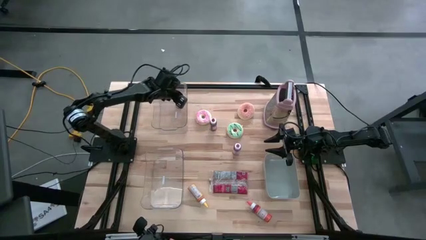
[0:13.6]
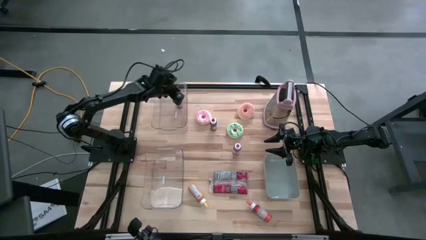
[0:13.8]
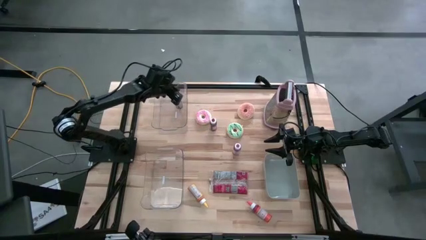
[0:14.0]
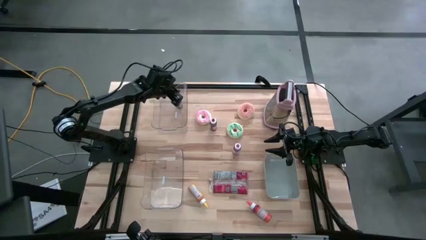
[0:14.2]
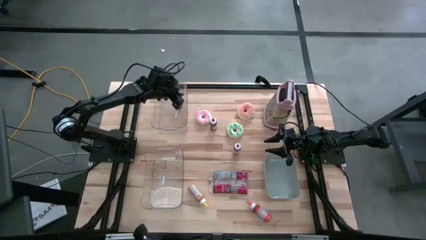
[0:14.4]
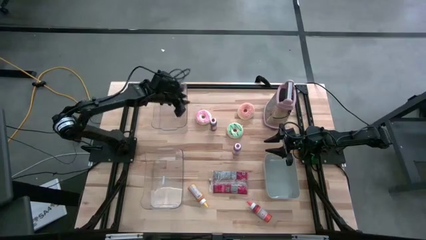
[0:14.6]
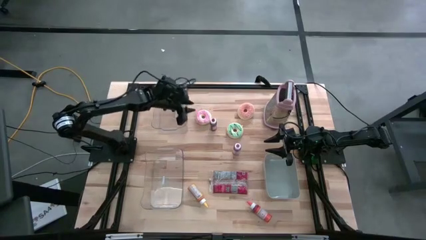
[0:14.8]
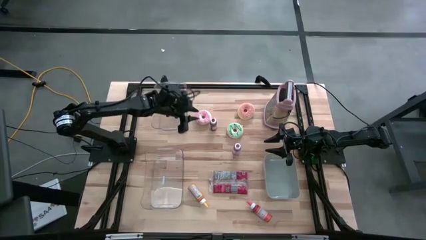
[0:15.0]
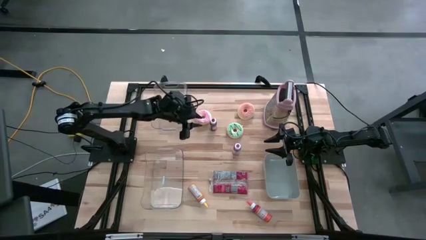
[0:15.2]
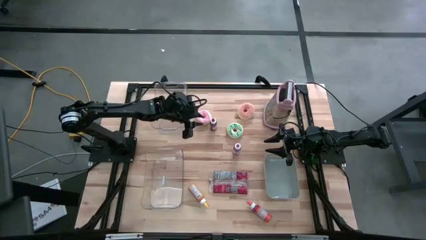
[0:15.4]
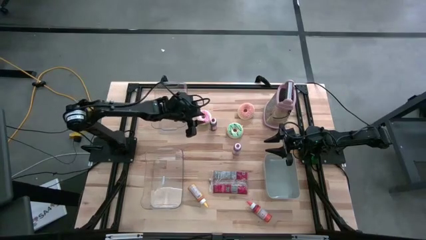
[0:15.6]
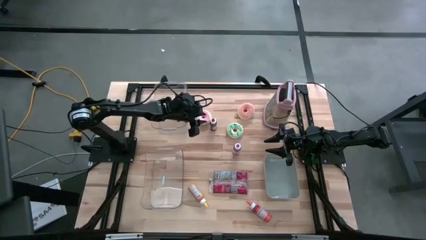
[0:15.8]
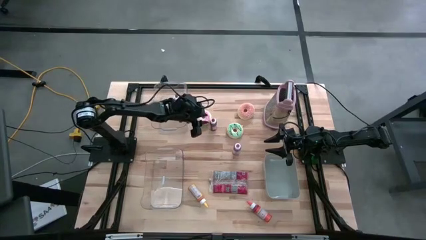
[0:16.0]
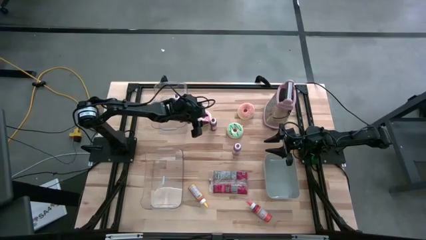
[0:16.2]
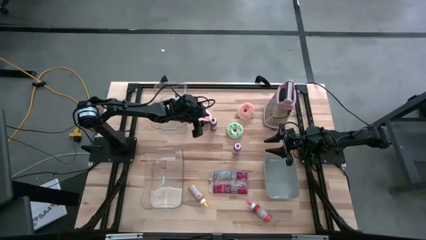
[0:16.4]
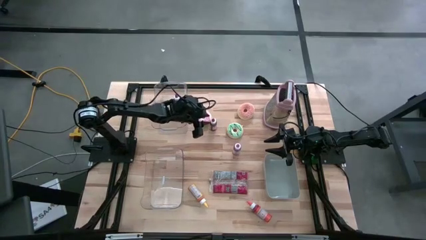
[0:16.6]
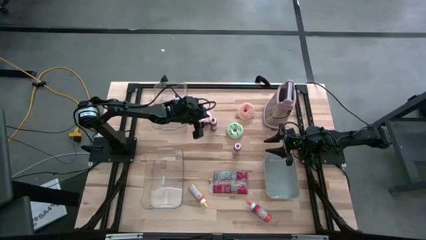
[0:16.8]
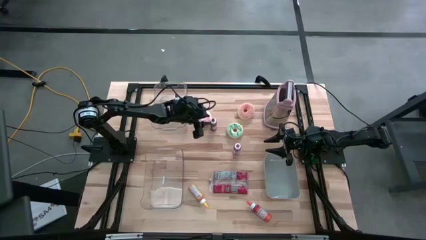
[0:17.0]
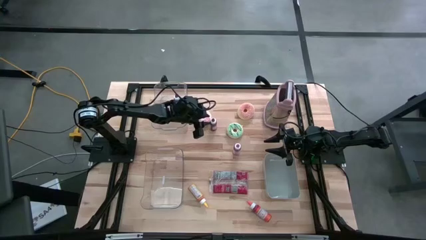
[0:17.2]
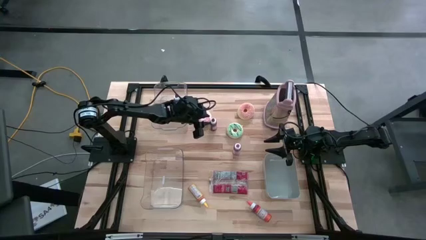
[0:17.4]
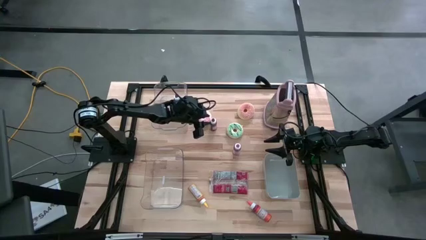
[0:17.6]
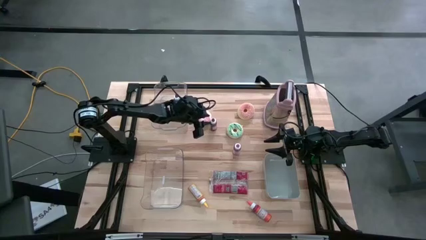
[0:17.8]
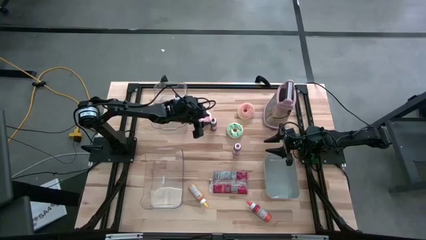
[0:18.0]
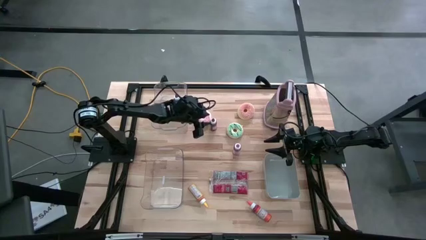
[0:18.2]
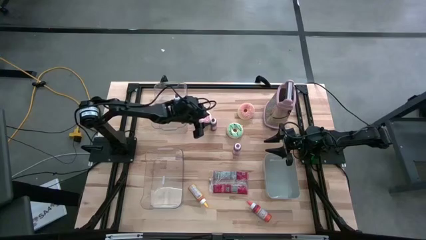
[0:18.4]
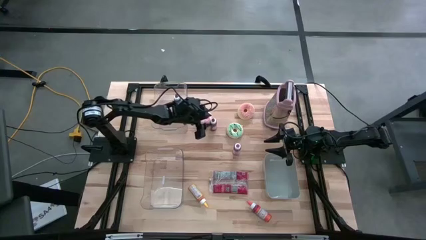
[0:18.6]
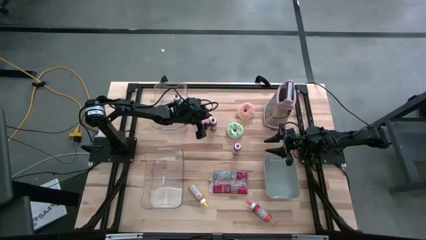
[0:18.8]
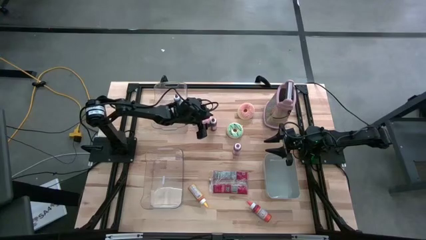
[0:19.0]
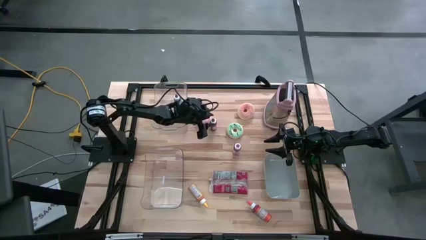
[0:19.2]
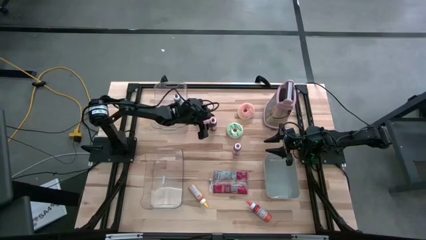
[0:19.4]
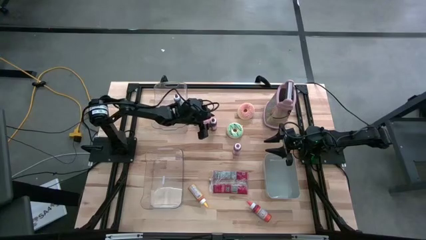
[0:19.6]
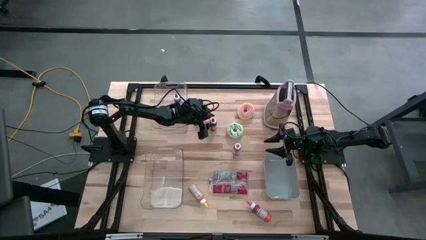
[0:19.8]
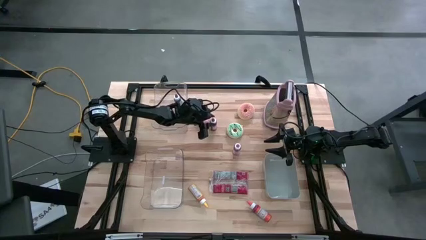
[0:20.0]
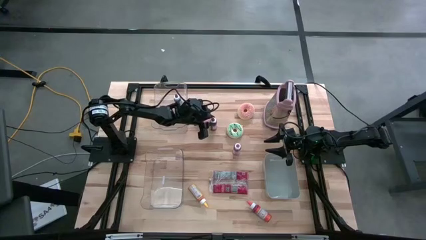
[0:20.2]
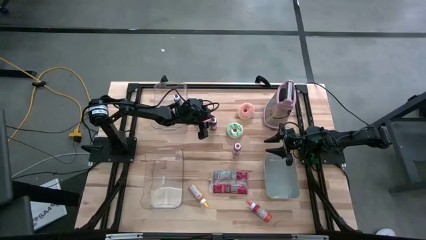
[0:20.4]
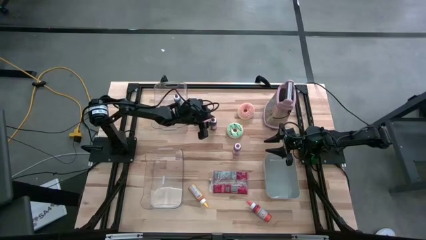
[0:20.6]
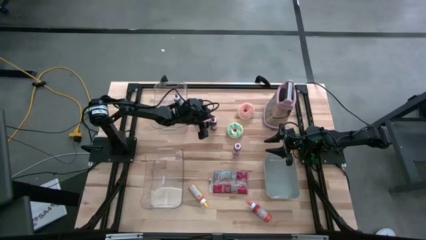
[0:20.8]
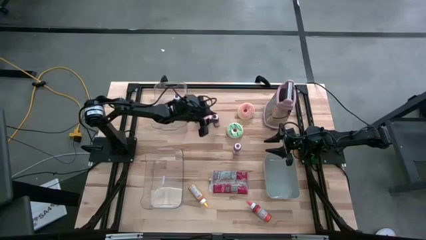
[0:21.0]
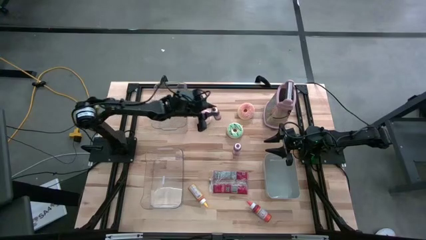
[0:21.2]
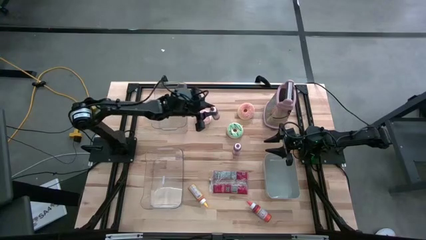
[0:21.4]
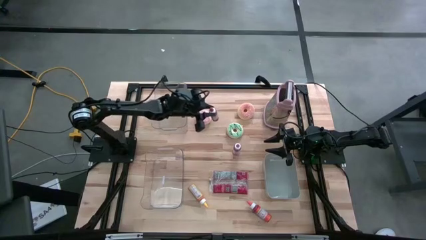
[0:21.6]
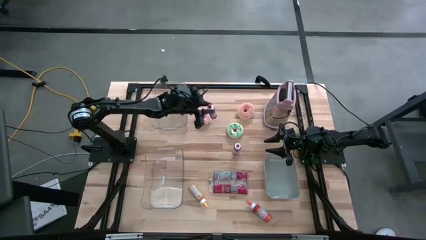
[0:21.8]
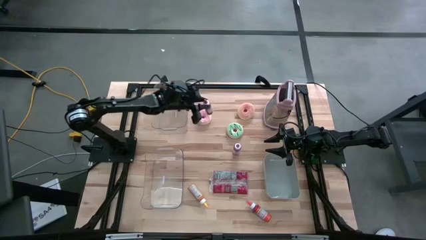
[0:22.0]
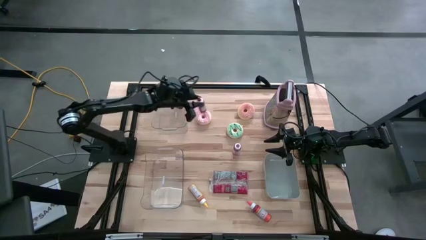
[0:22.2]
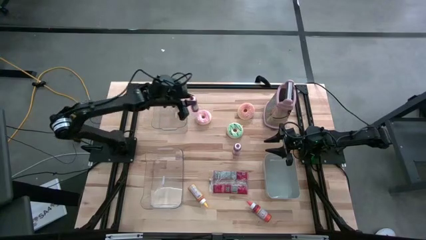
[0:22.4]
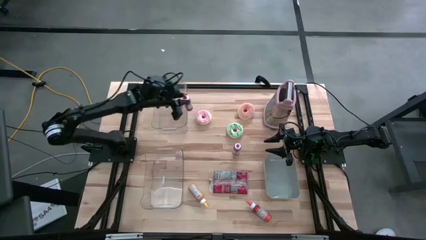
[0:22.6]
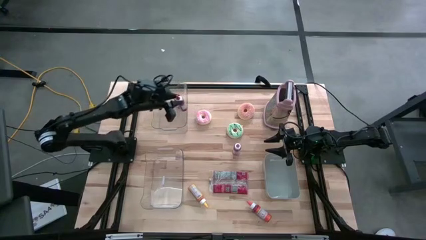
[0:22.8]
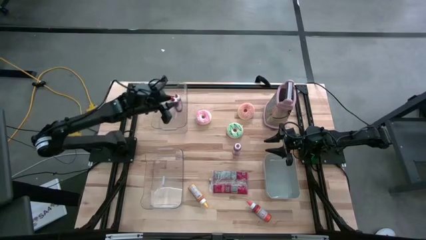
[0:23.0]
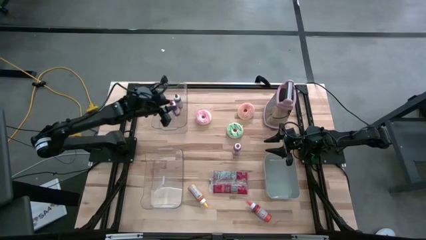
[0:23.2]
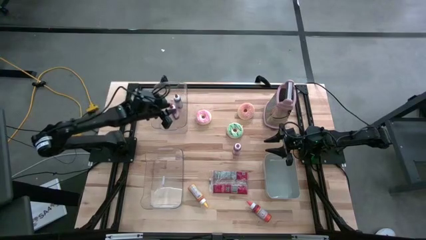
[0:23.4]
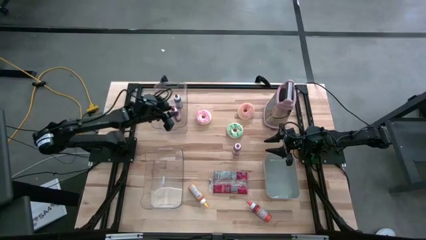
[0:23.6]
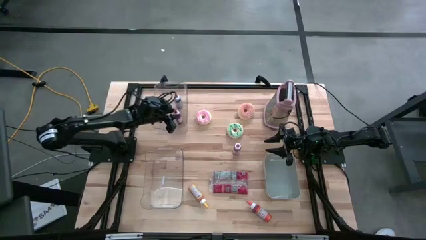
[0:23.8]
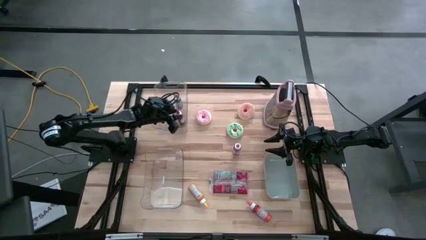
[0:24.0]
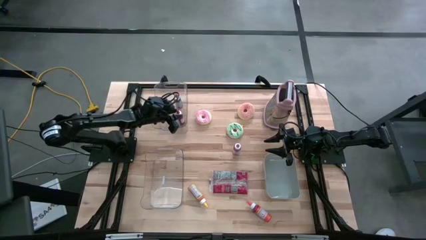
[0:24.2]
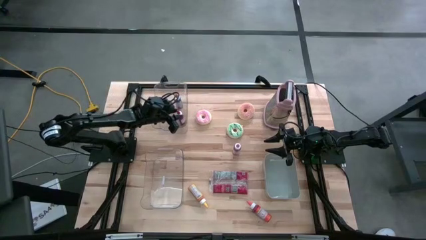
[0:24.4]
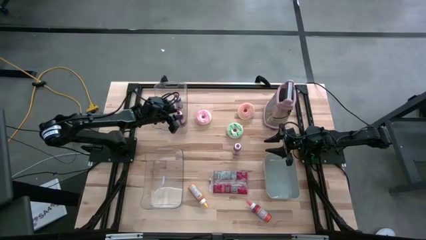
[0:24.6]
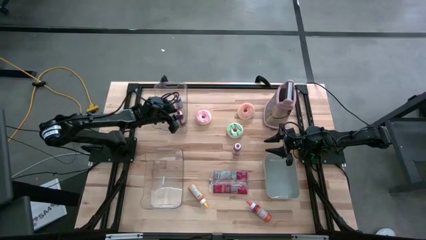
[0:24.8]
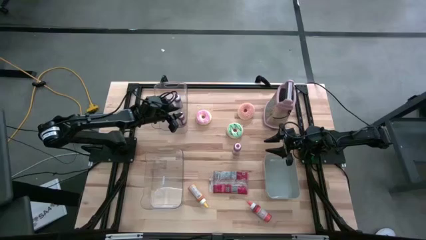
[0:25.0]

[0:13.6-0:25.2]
Put the red food coloring bottle into the top transparent bin
